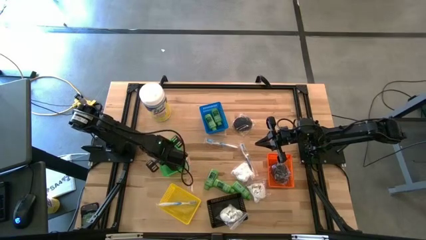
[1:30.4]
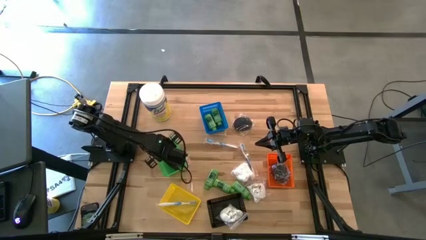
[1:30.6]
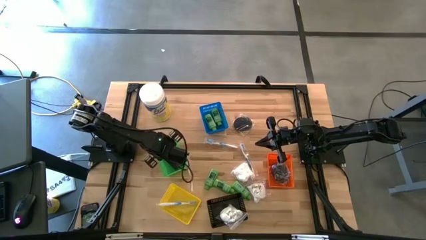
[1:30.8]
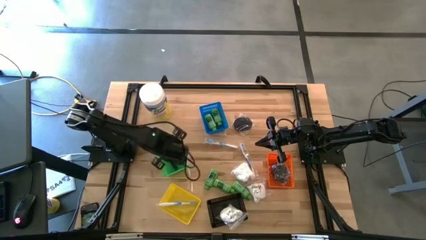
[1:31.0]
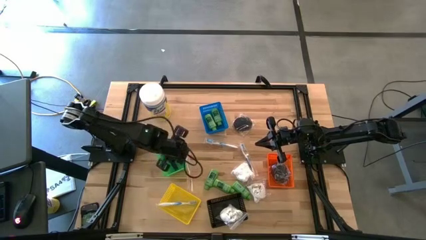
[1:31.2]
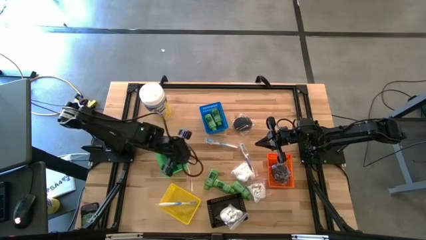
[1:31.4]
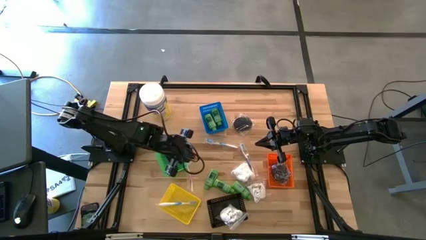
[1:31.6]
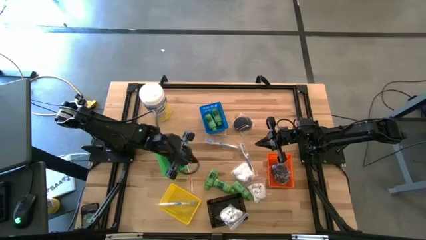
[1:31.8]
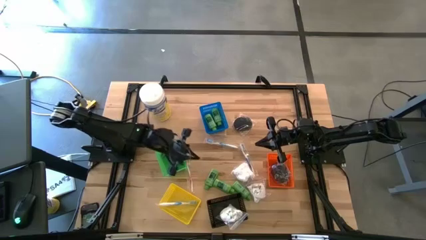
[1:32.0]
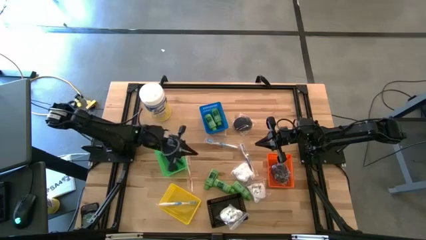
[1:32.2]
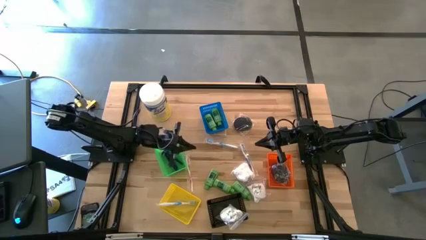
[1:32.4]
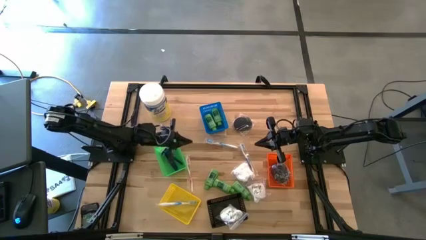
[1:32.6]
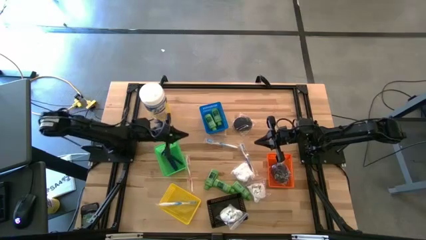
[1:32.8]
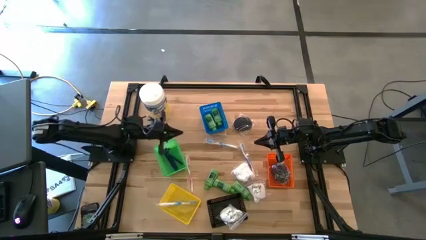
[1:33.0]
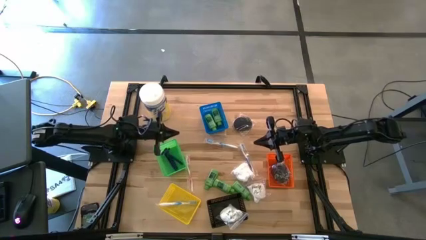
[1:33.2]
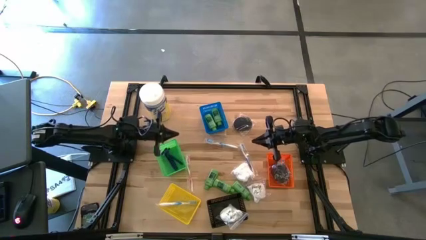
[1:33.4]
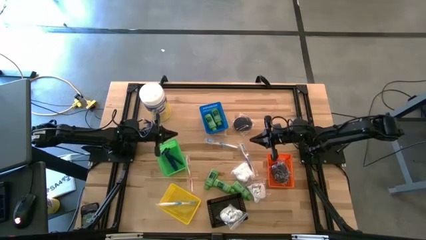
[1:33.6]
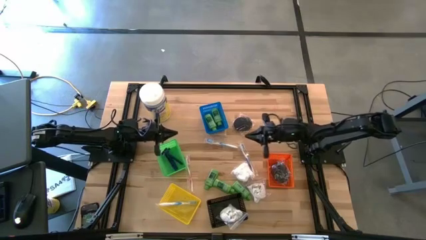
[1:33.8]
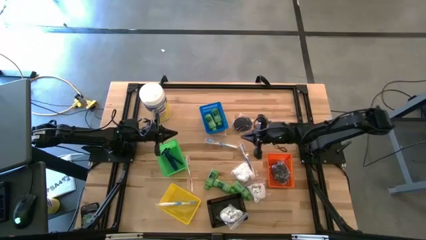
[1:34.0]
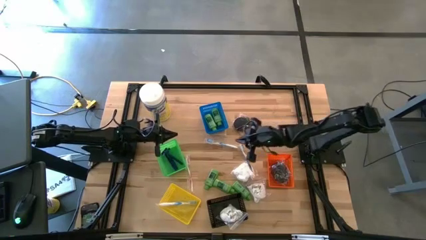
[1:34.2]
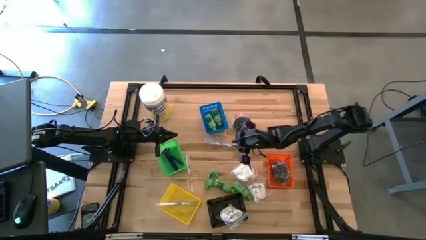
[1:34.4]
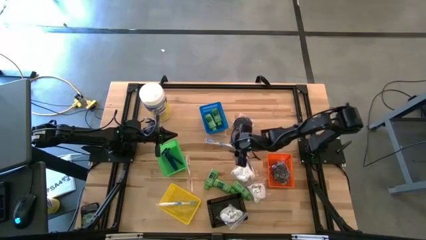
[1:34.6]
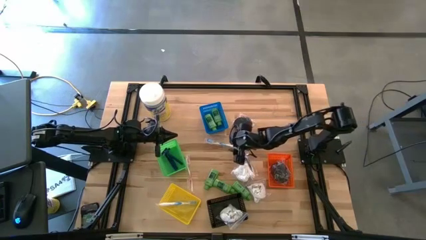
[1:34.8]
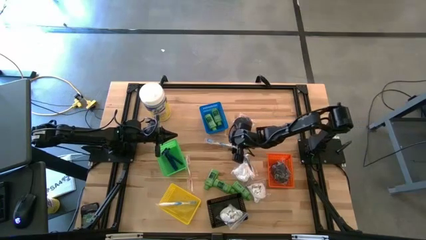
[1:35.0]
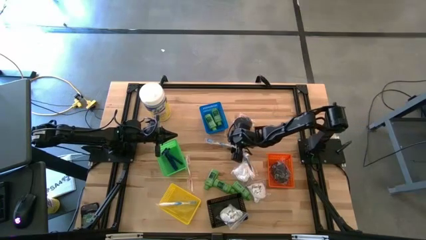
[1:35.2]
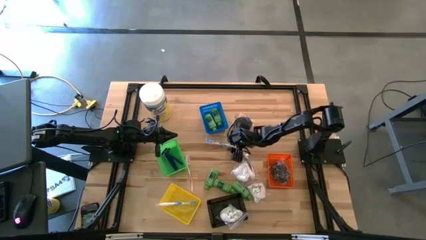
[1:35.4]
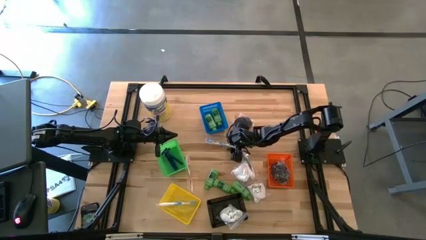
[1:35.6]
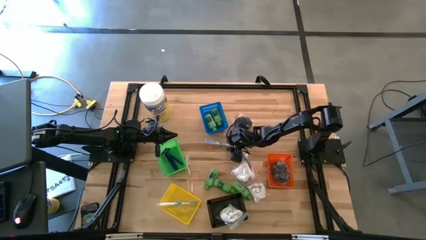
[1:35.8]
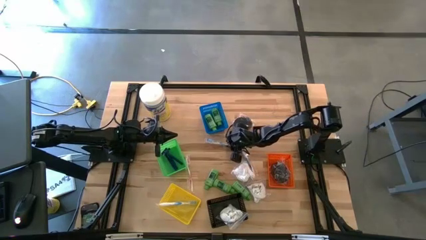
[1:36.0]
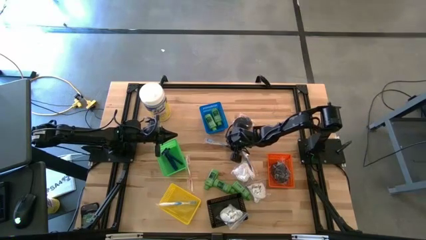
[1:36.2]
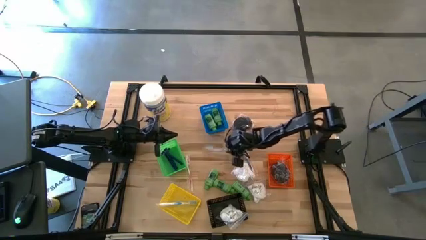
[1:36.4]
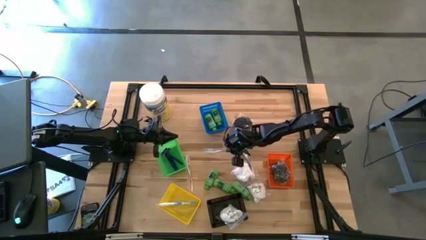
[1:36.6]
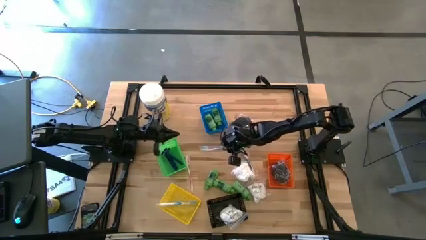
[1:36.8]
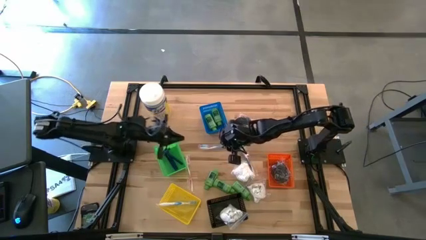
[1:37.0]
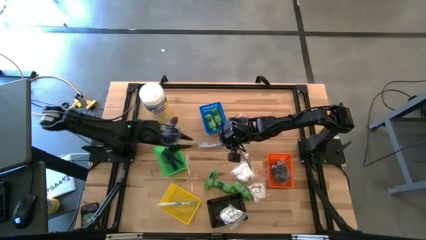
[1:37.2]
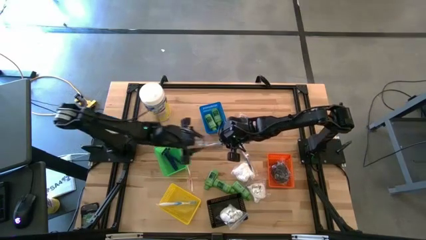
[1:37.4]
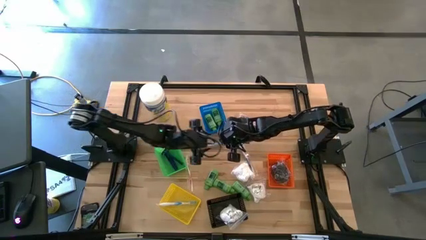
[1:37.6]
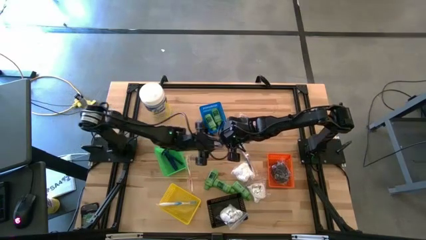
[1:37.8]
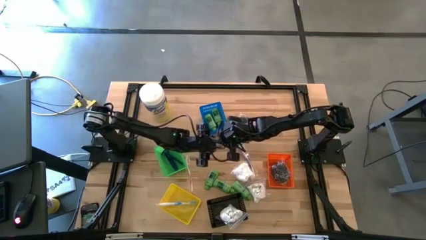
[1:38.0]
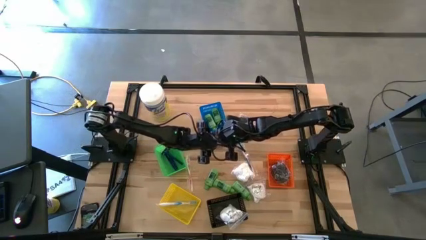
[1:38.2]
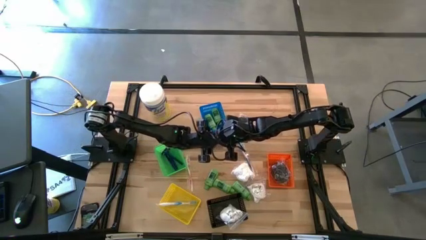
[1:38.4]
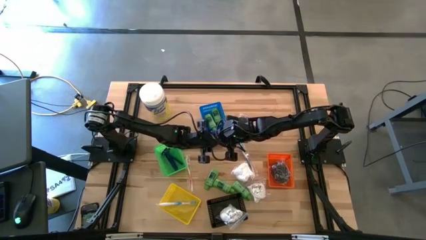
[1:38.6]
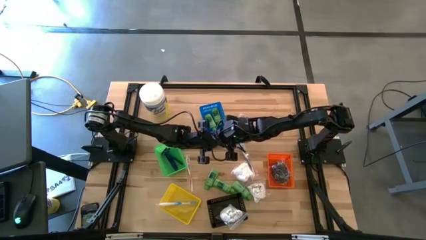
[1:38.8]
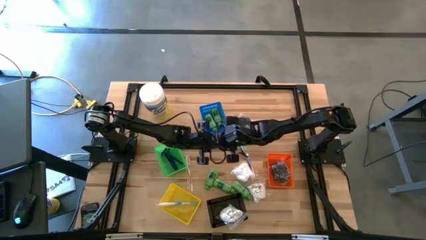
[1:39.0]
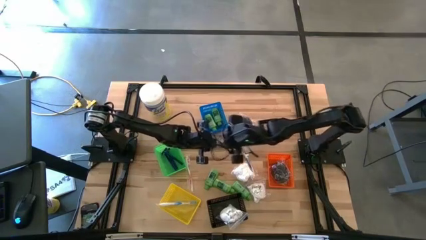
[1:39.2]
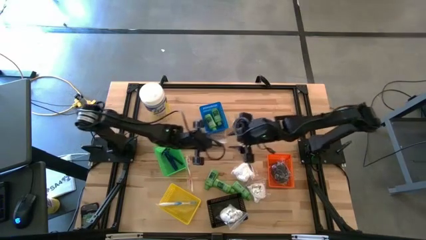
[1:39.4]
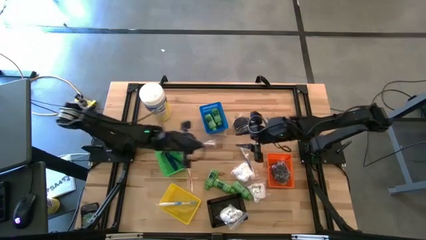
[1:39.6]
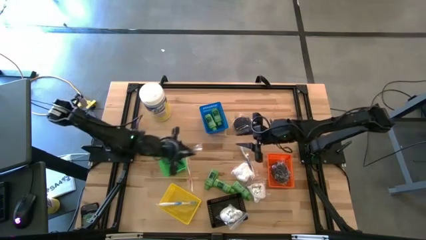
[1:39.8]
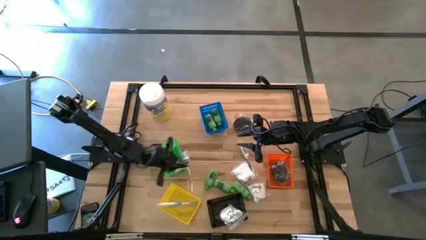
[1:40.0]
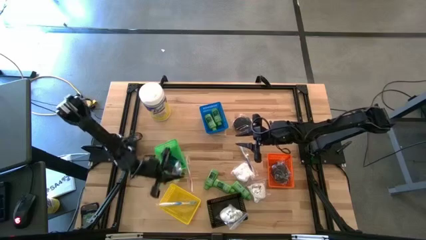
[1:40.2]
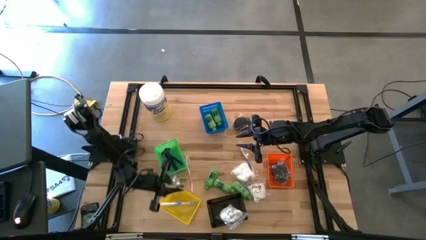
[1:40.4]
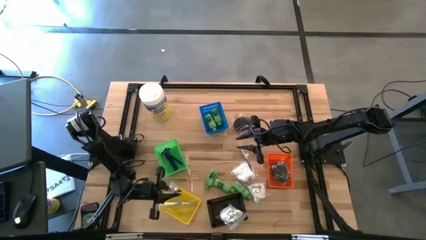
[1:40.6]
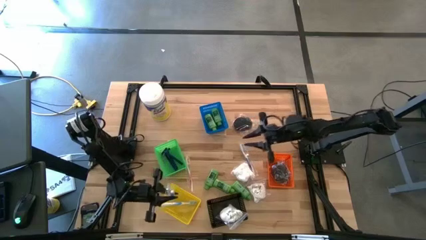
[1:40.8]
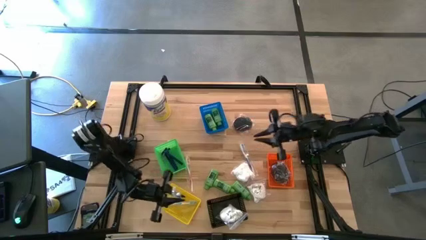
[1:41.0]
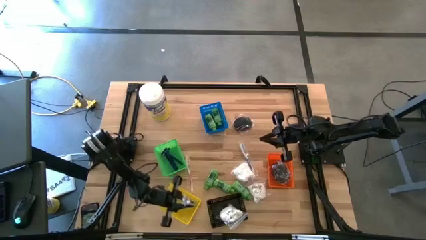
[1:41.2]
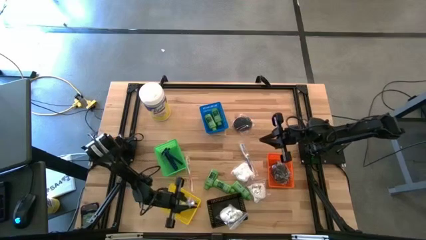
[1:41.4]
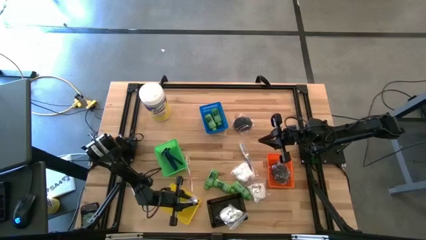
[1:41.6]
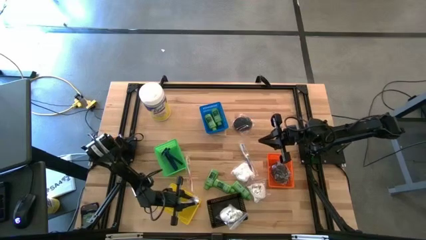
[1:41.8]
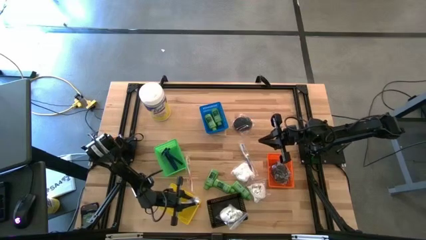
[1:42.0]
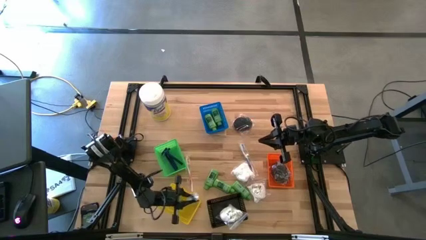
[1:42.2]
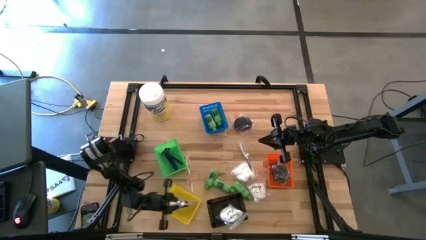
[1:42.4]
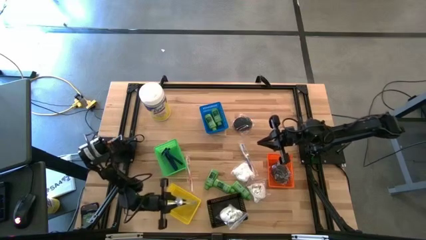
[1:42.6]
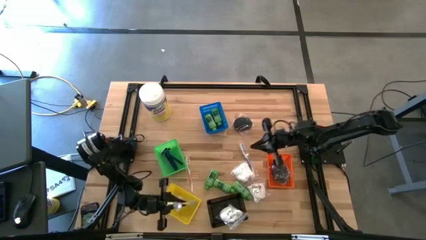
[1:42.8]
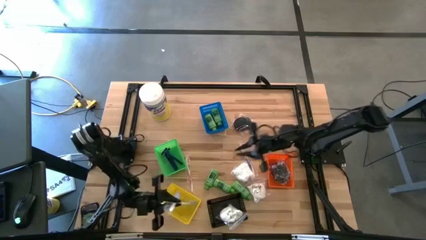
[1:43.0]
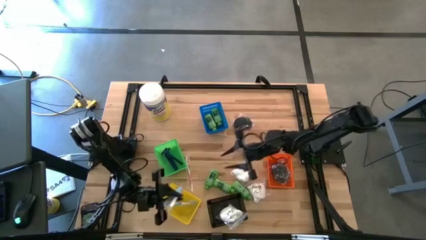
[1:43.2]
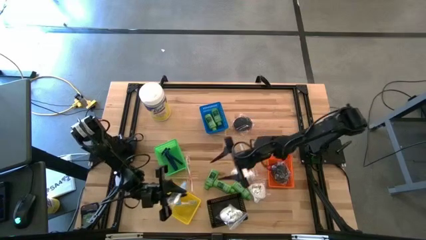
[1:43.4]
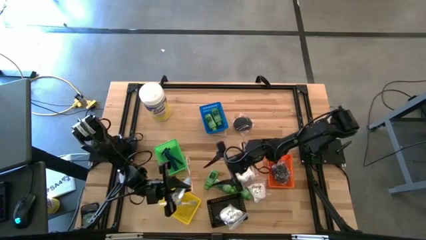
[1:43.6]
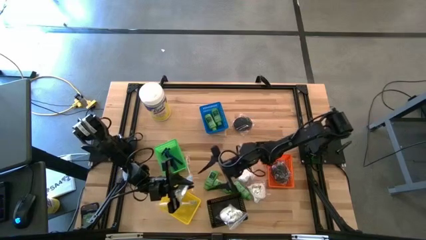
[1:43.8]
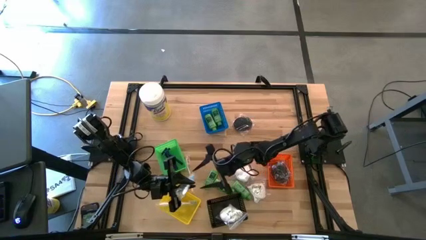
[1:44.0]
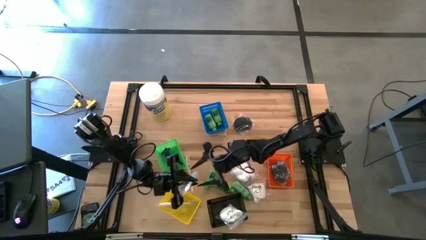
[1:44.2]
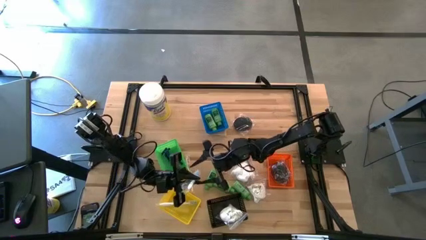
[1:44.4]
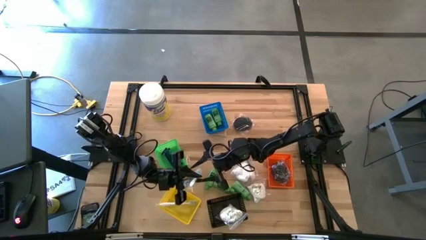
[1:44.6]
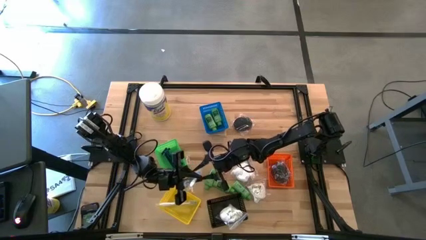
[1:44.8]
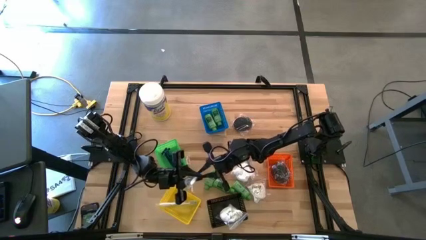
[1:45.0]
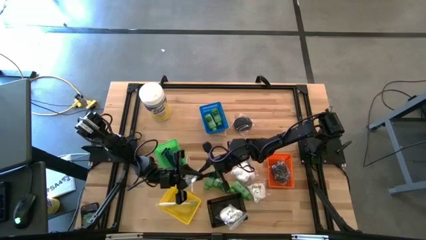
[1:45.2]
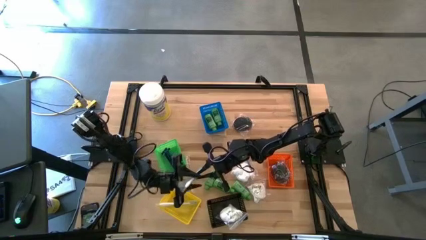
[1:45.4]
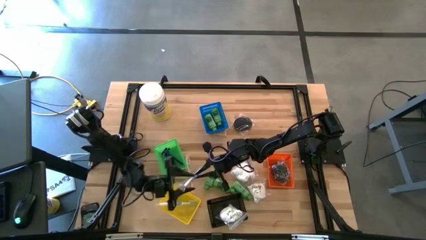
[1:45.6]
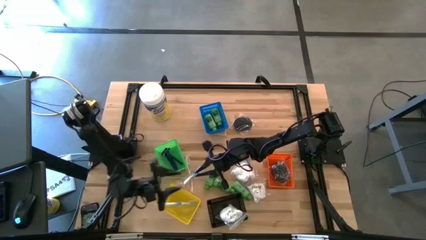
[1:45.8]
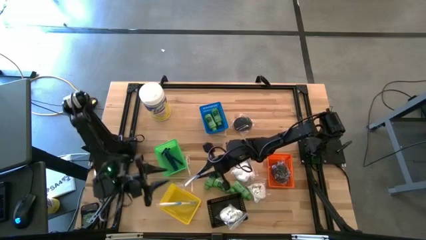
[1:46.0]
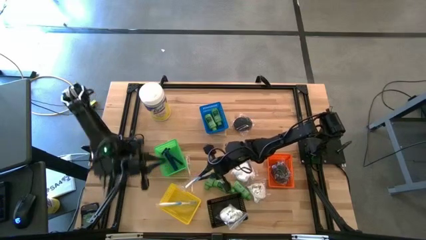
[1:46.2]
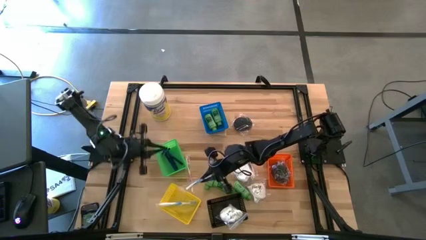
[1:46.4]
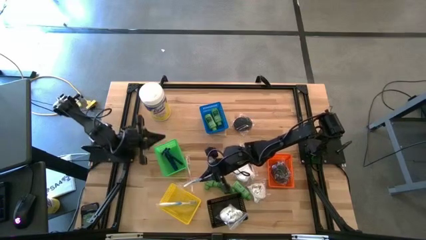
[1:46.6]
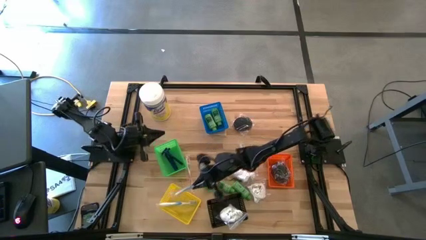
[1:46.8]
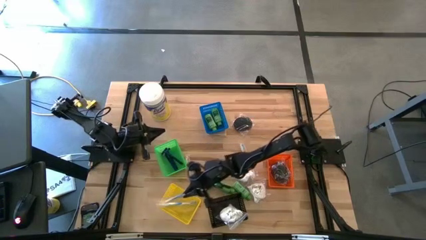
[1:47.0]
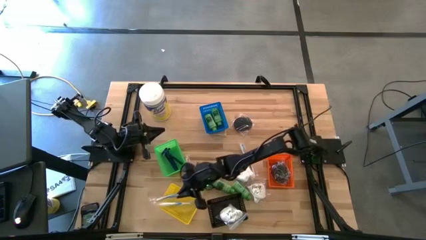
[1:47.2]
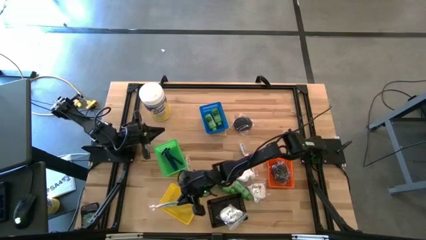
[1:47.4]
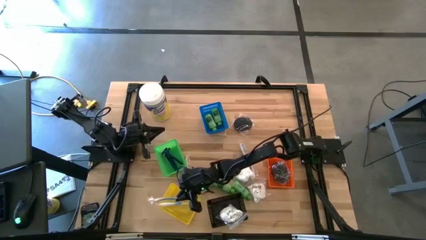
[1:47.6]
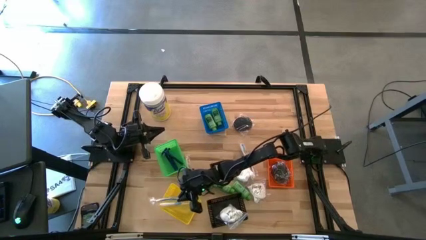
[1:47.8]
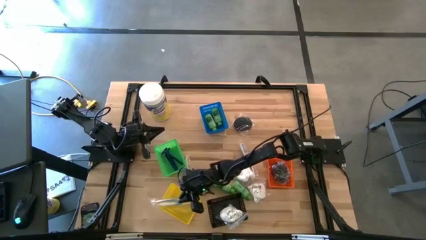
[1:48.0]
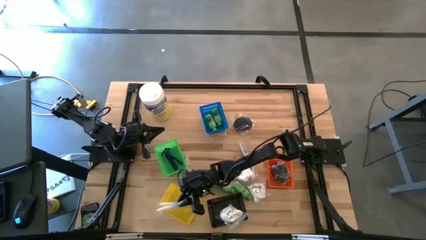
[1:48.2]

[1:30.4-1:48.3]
Task: Pick & Place Travel size toiletries
Put the blue toothbrush into the yellow bin
